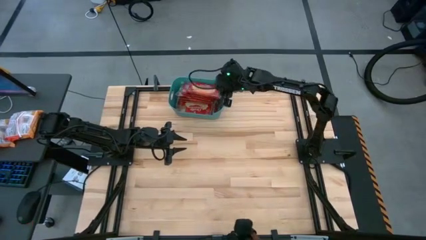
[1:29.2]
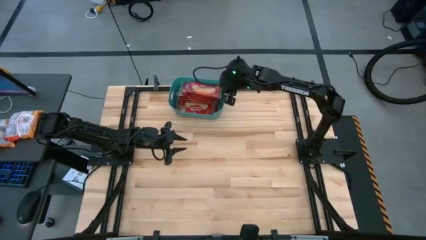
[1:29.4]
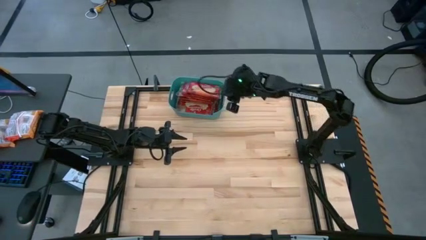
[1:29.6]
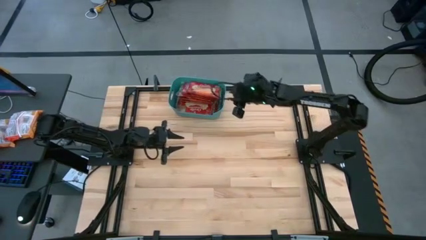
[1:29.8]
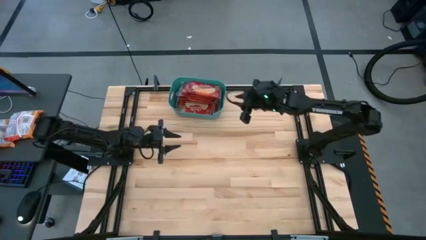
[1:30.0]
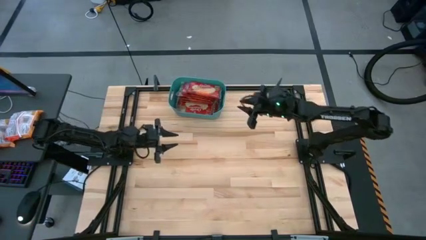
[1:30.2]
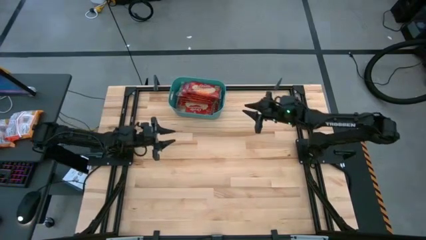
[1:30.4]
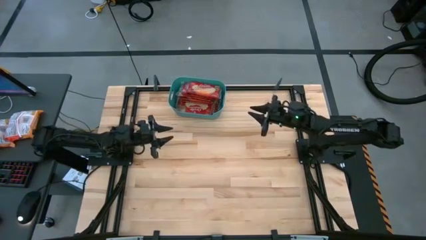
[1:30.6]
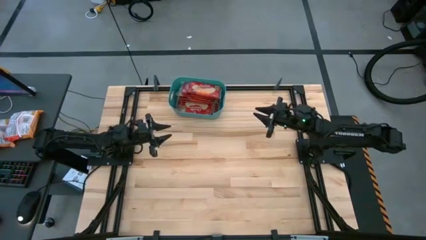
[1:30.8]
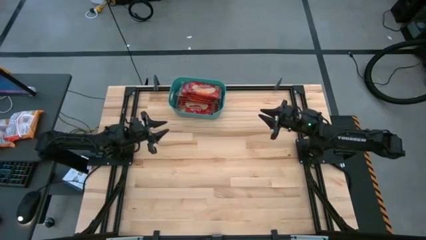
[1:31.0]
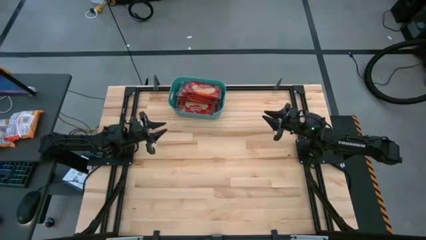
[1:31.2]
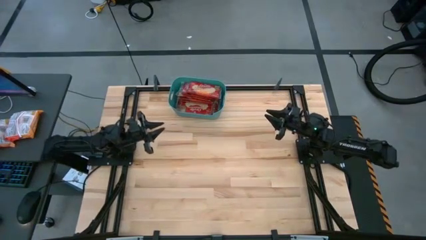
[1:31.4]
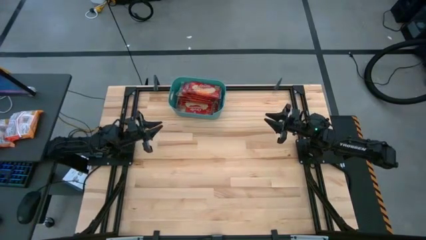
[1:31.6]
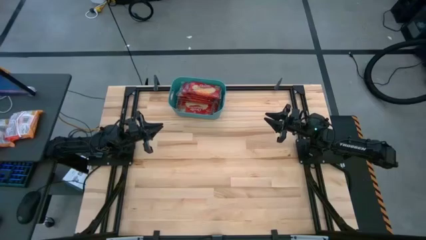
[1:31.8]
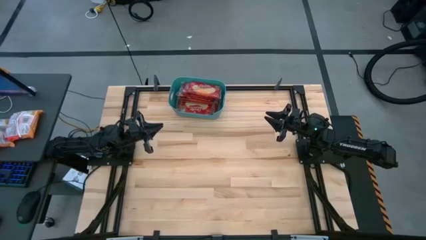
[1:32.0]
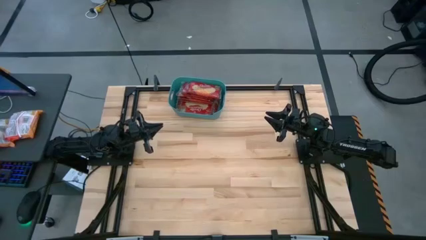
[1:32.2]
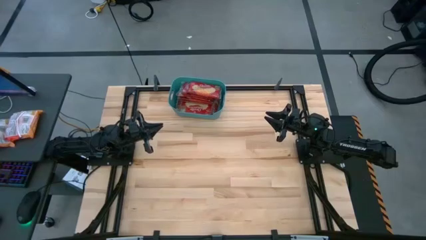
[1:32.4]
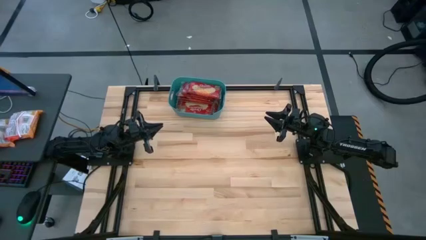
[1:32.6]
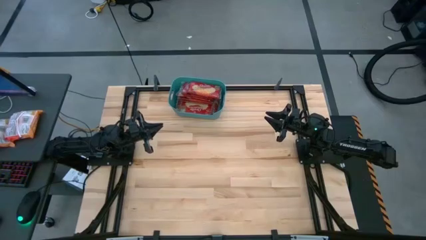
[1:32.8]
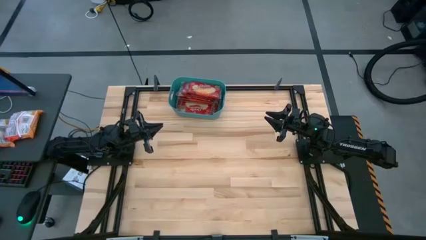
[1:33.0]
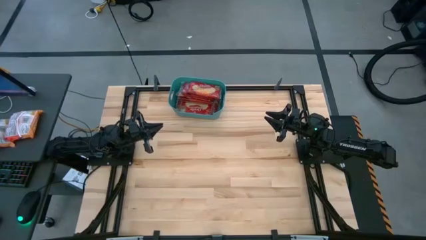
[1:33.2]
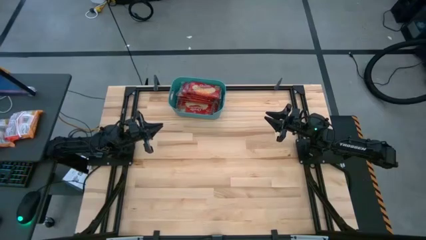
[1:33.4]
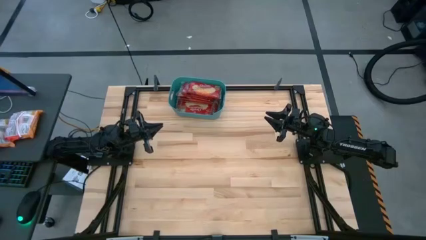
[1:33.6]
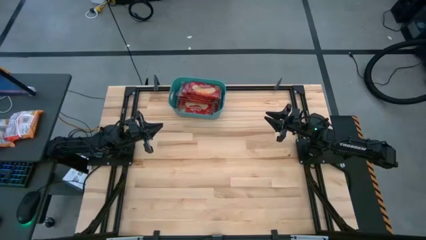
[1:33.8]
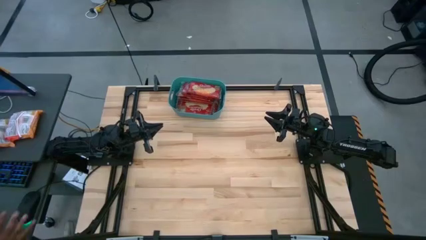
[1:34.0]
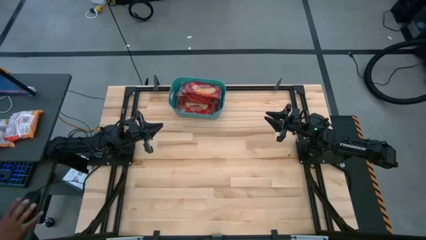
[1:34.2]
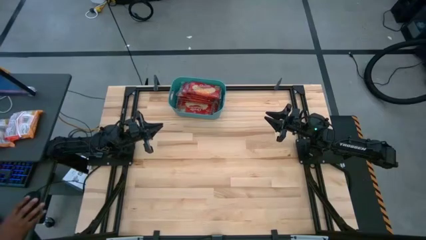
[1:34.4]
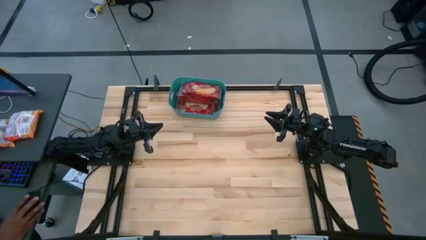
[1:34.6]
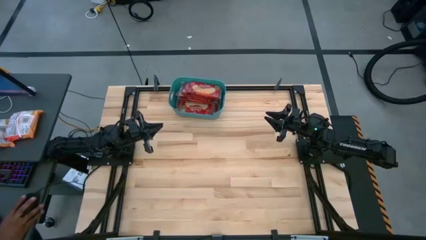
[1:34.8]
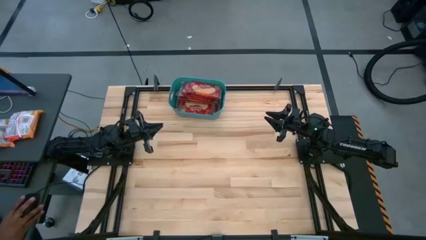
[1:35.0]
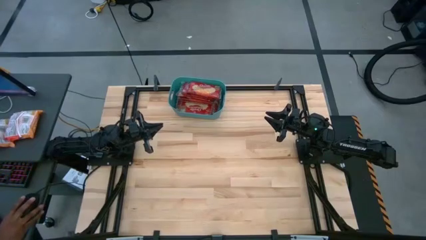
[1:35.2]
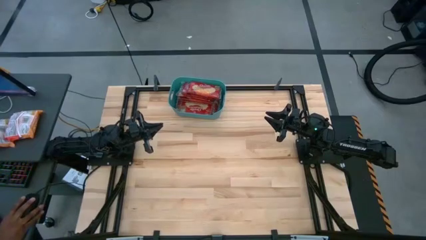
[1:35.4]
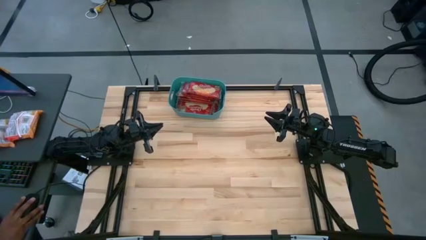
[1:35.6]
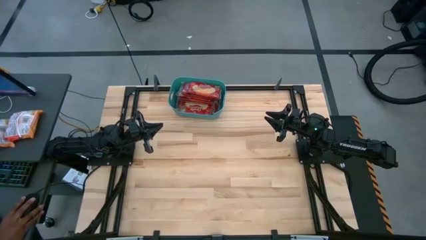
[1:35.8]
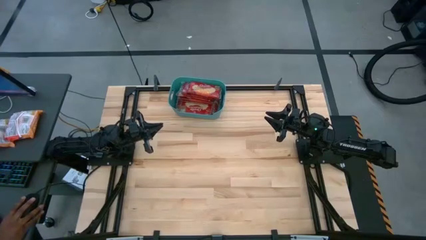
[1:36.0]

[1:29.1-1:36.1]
Task: Sort popcorn bags into baskets
Return to home position

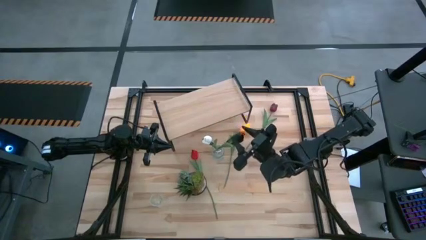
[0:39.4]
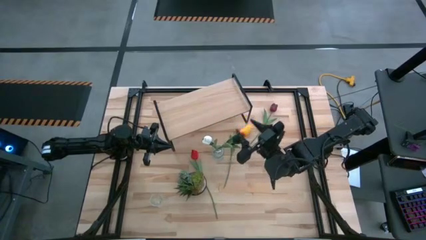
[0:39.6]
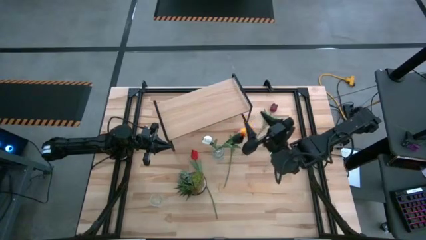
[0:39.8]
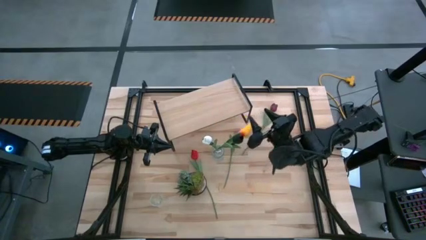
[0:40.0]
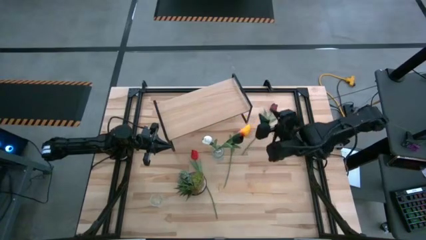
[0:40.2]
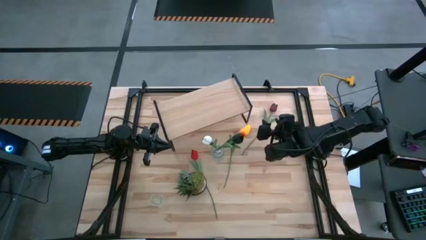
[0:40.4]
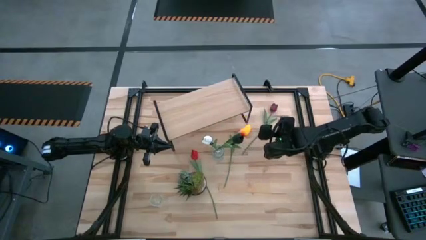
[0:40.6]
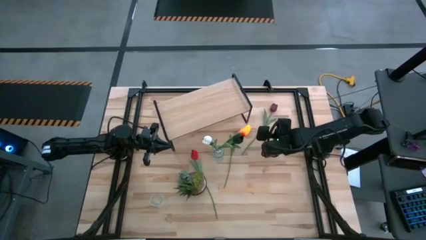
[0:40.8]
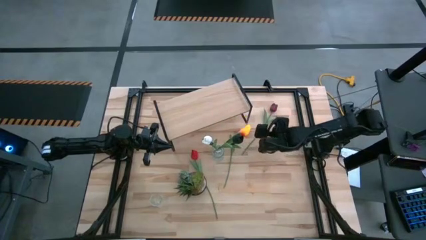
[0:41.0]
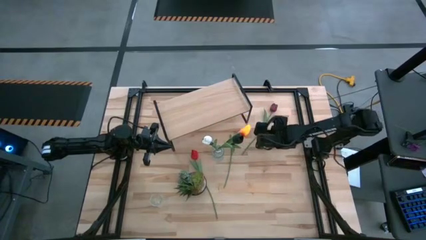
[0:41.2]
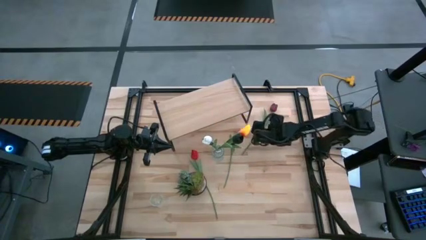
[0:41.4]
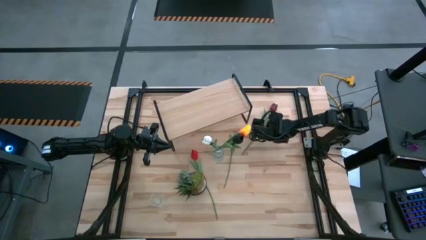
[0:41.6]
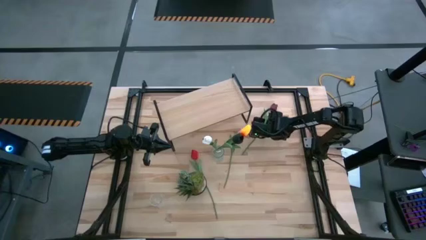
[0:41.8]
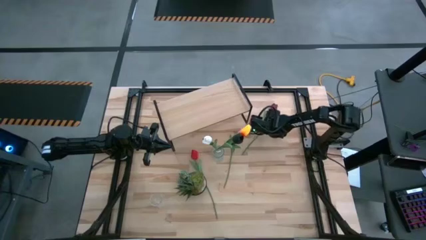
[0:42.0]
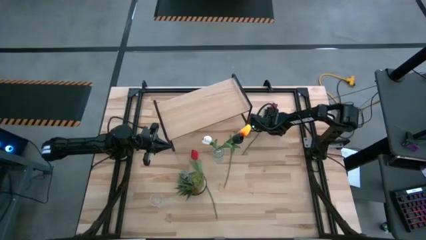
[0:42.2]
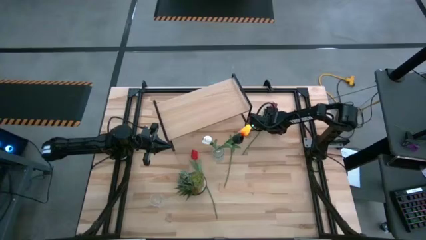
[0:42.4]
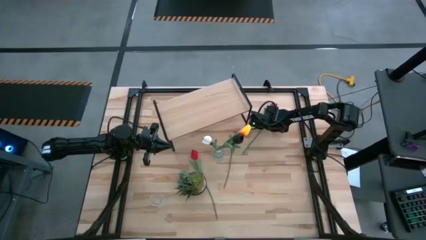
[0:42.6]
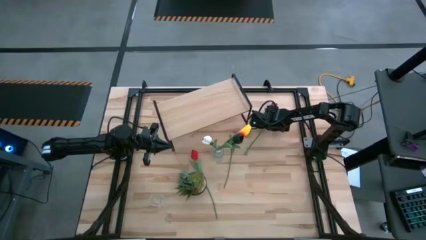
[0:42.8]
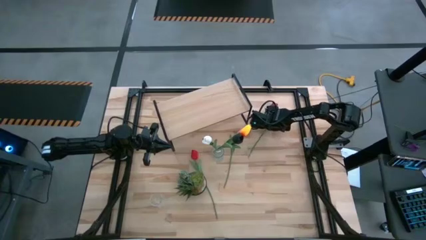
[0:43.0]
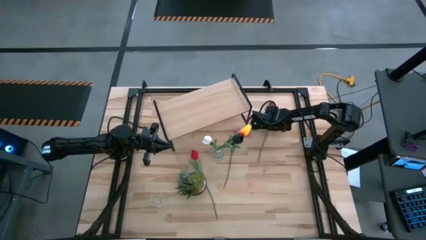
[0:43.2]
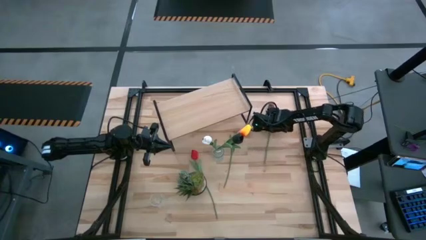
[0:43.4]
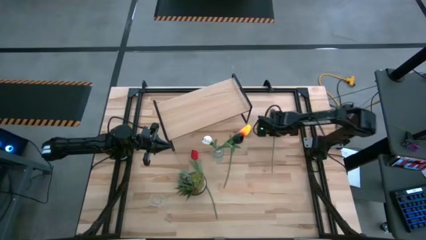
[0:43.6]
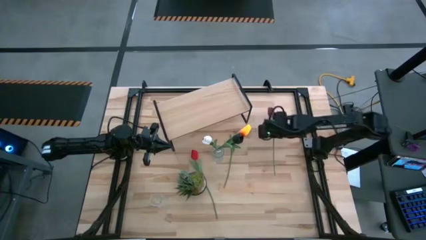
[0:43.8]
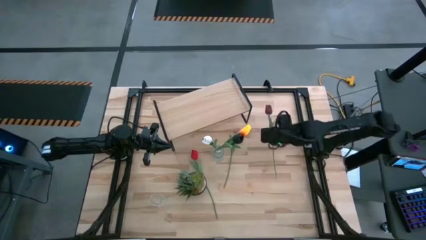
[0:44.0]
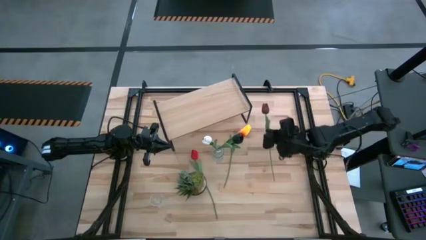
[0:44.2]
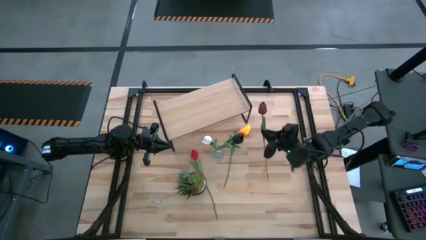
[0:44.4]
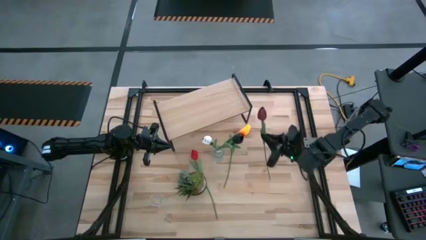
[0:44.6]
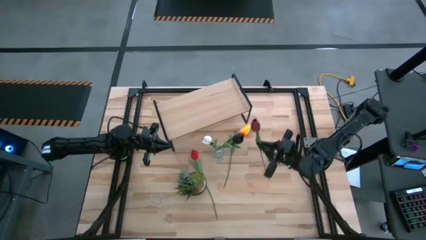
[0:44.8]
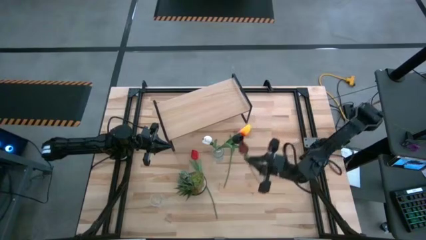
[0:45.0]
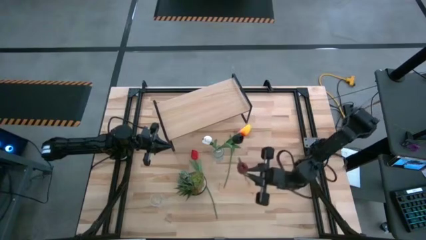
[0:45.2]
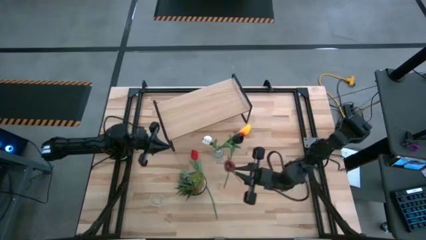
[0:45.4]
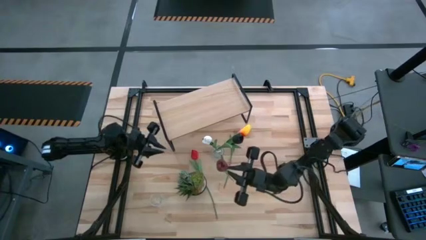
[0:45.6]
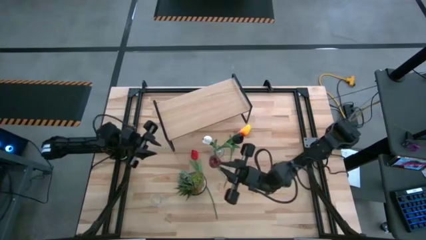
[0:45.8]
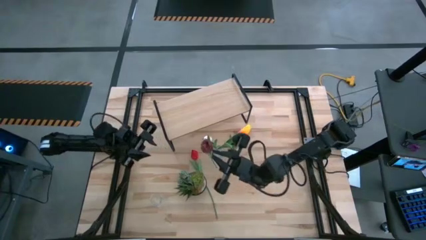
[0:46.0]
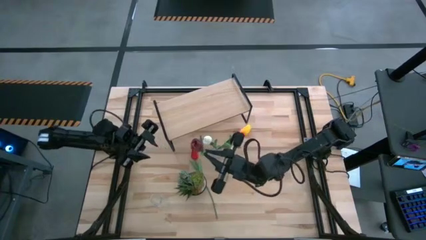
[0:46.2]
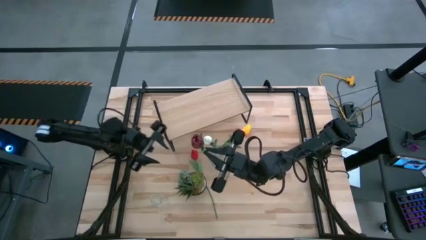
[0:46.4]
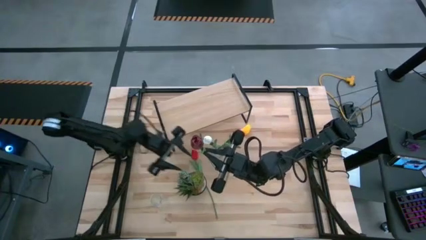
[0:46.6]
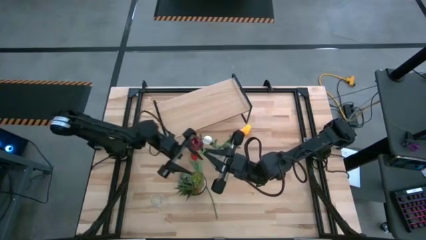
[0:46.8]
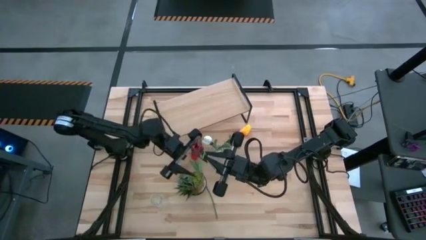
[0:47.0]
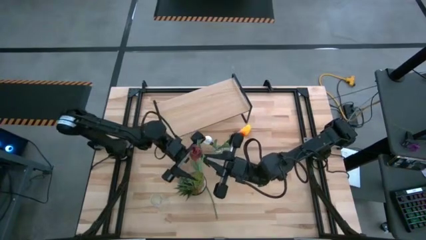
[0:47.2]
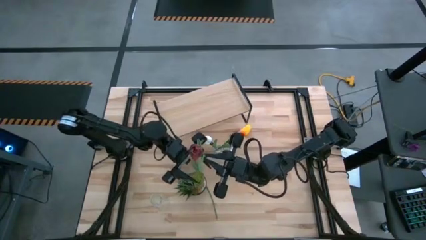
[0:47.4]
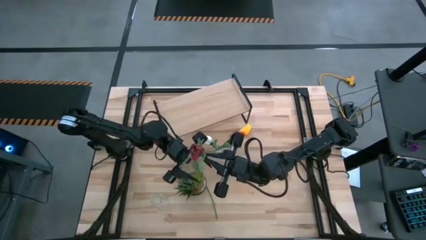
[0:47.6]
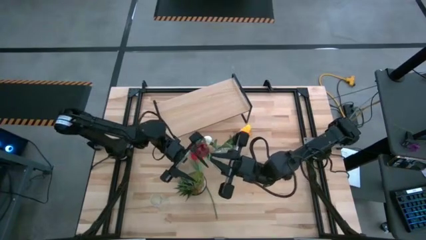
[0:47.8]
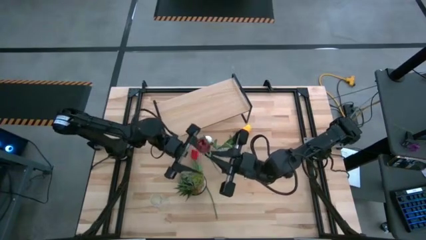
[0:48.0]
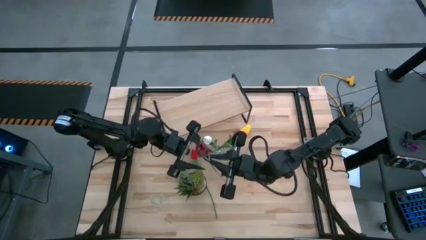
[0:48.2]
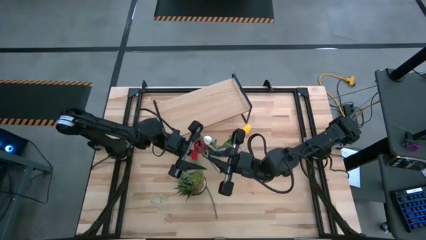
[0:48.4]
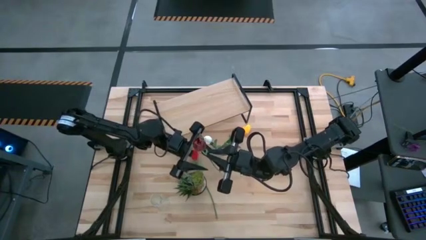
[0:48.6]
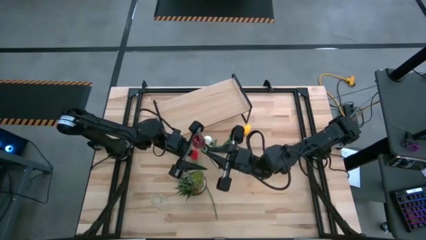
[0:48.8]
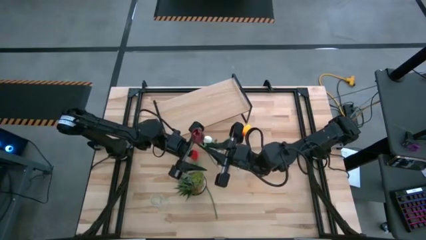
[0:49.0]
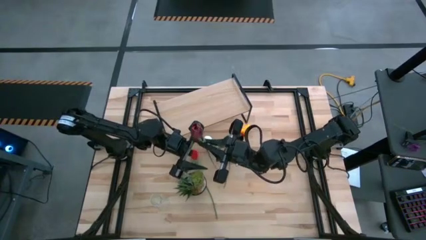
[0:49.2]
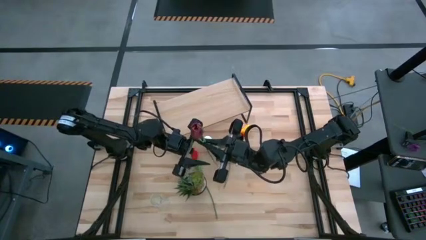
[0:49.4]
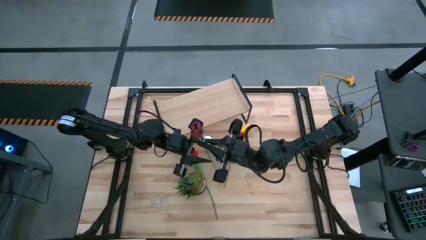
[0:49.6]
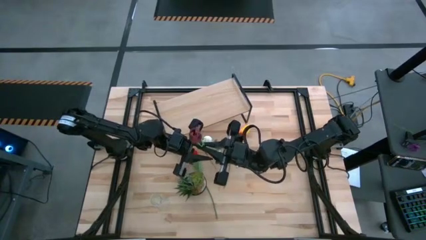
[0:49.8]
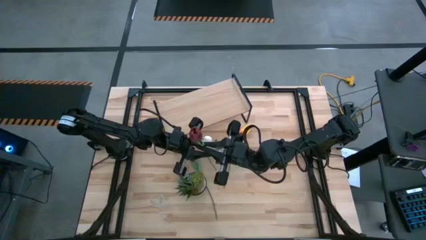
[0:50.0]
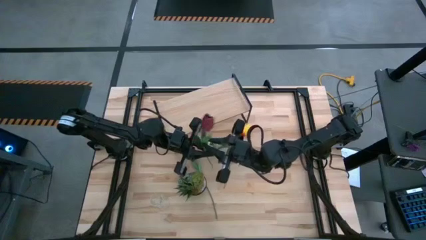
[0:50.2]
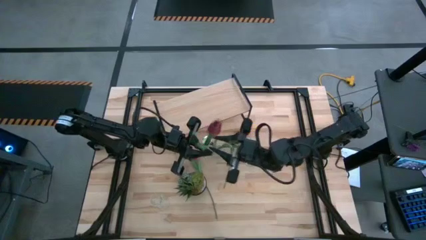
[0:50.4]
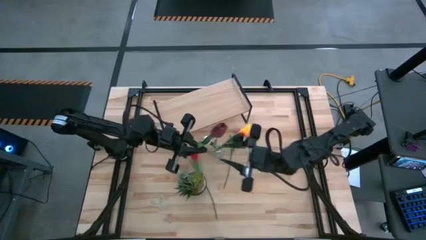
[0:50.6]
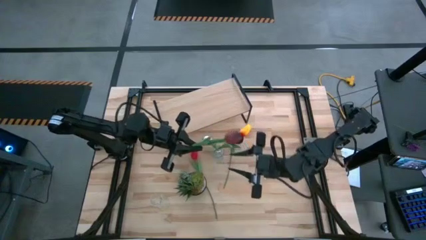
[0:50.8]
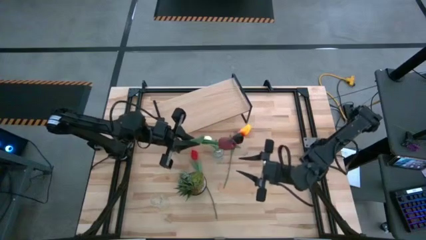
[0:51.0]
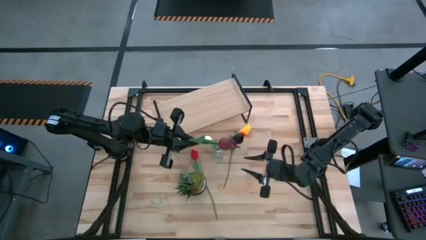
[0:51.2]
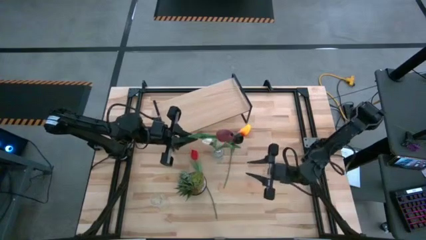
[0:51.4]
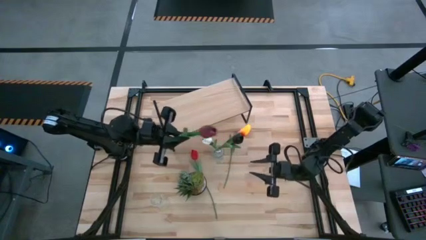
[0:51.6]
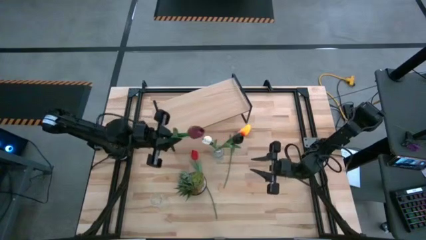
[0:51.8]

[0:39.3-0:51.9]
Task: Pick and place flowers into a vace then onto a shelf
Put the dark red tulip into the bottom transparent bin
